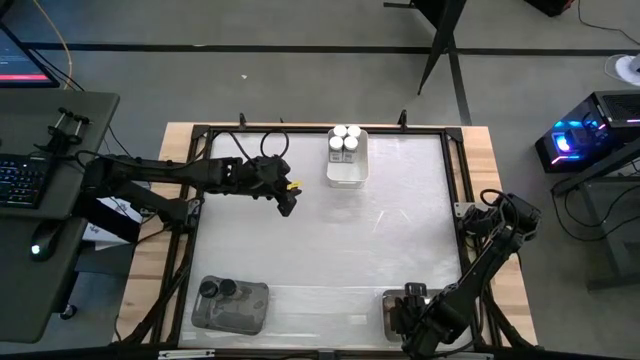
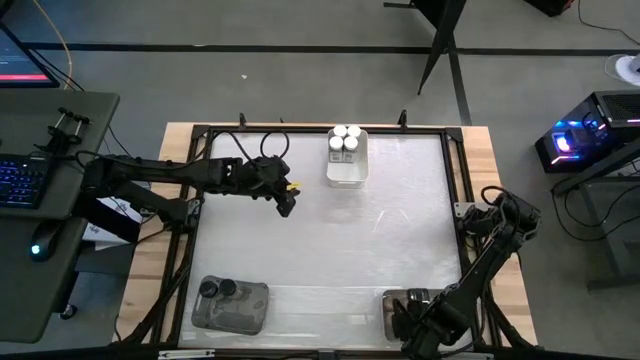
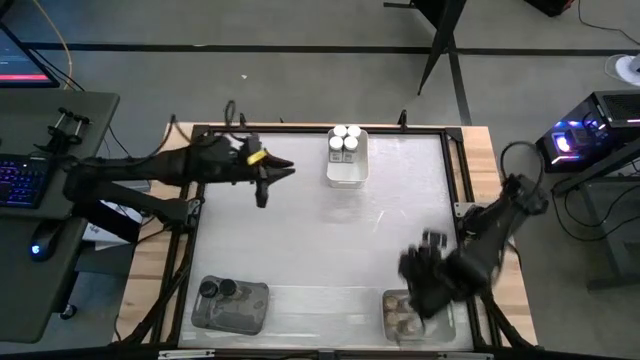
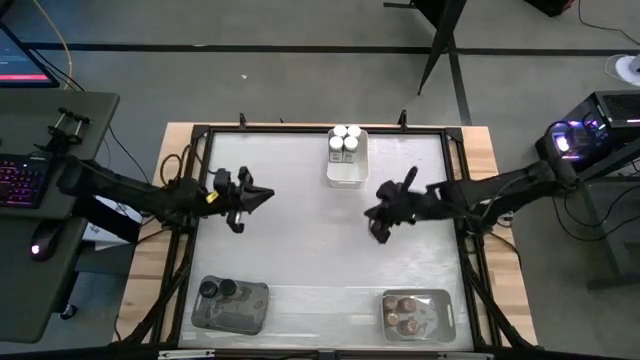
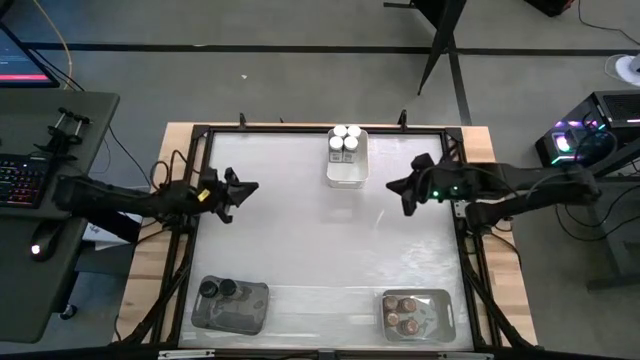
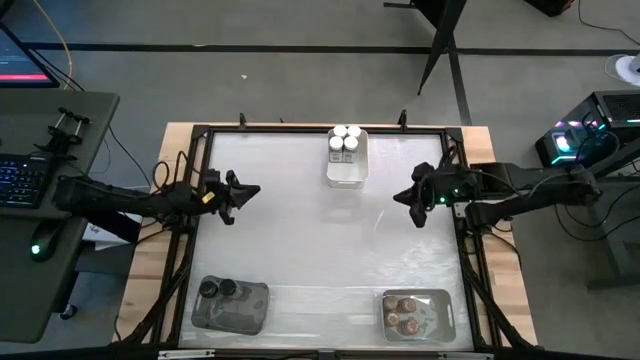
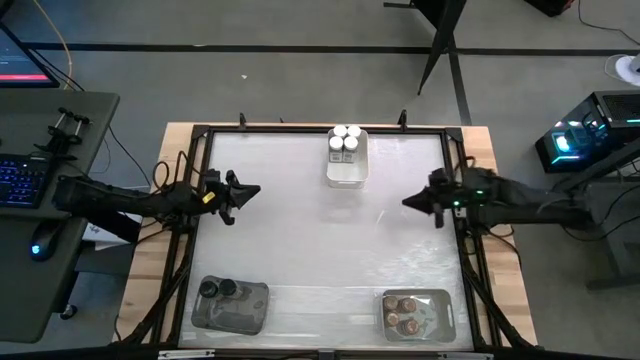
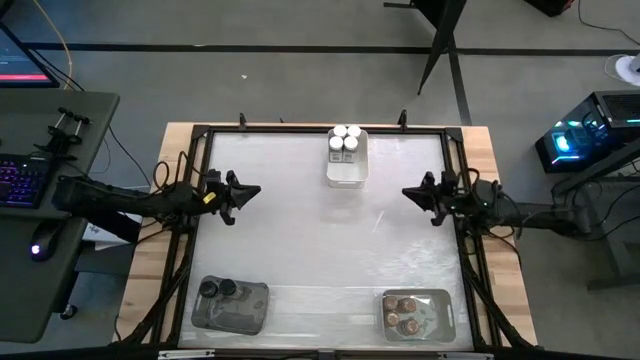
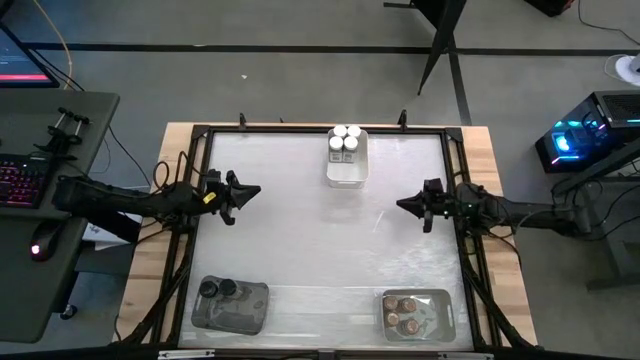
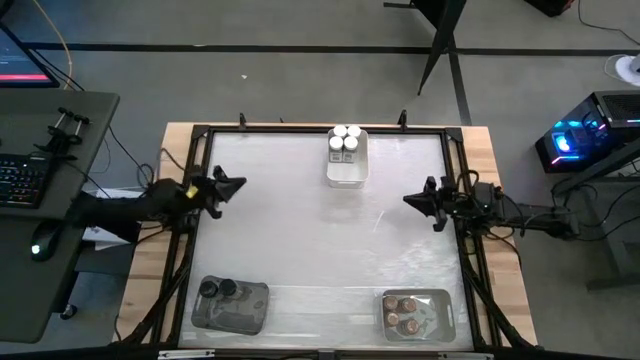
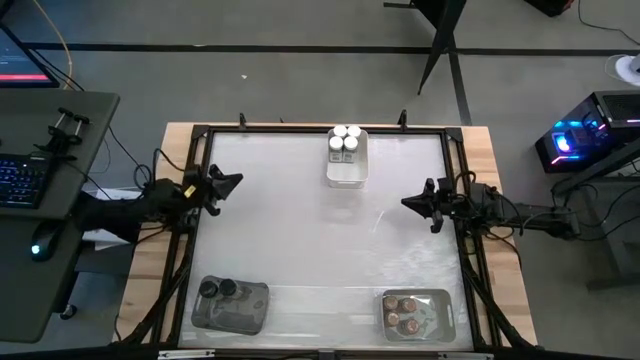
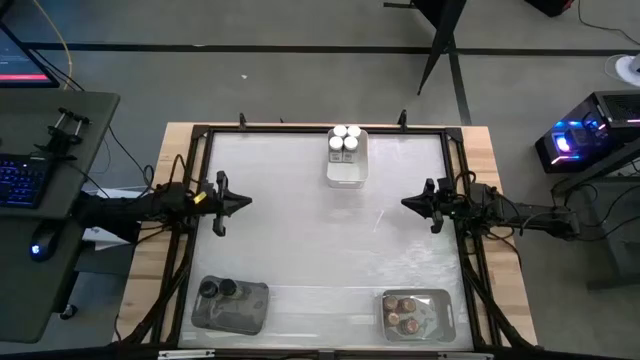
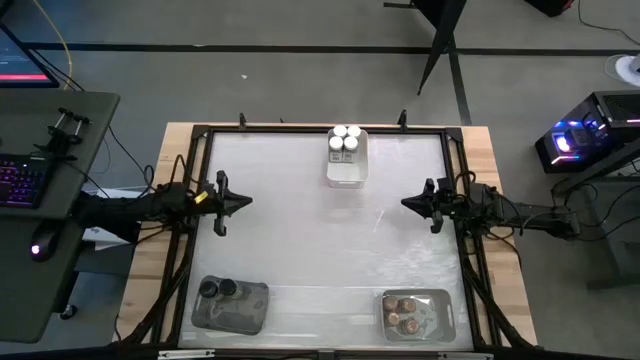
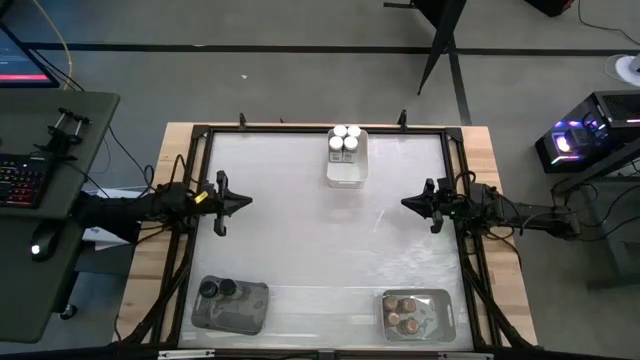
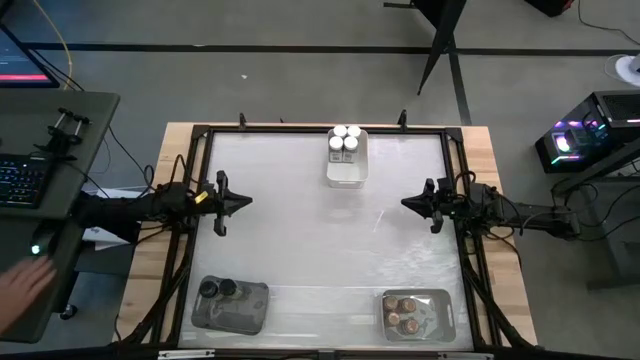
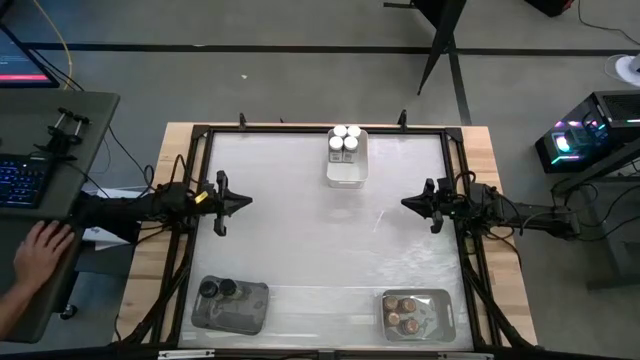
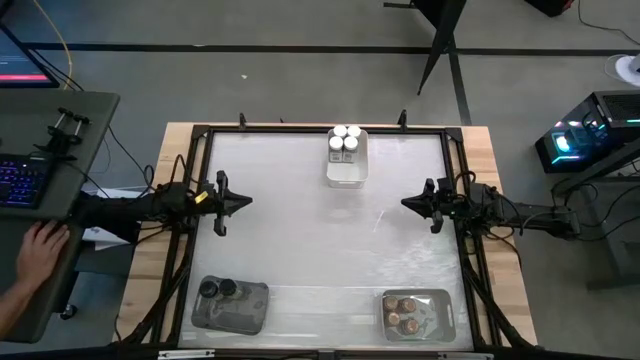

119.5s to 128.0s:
Task: Sort spices by type
Return to Home Position

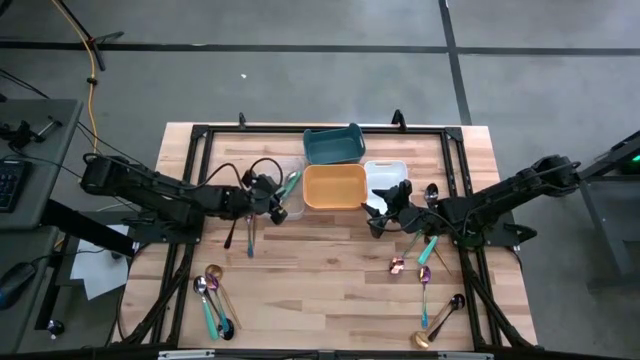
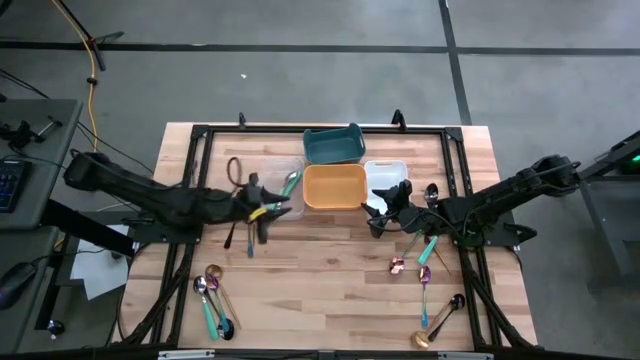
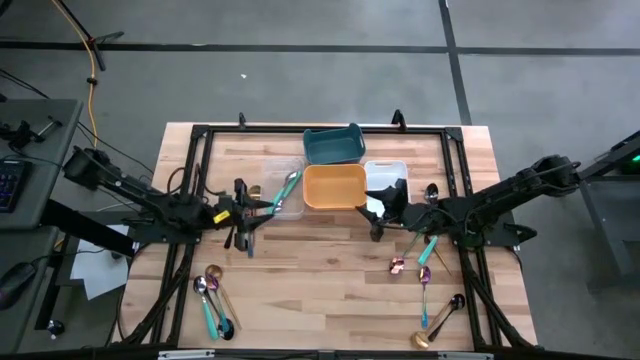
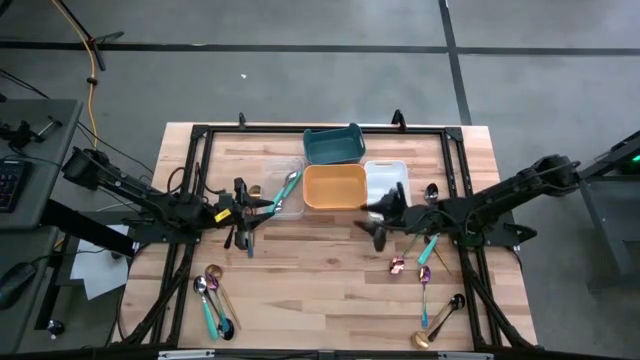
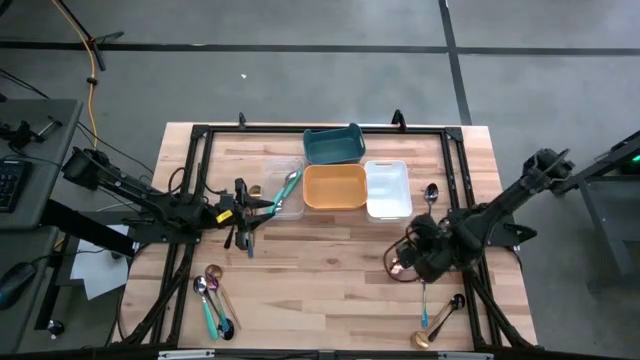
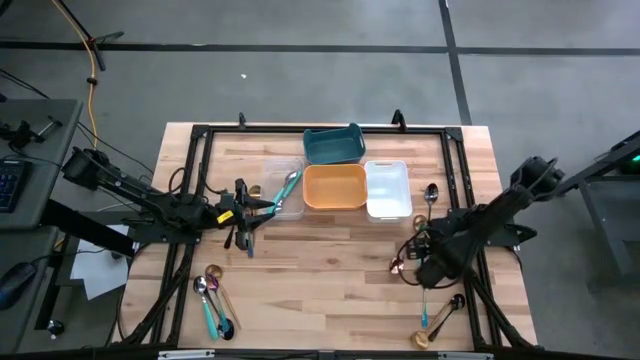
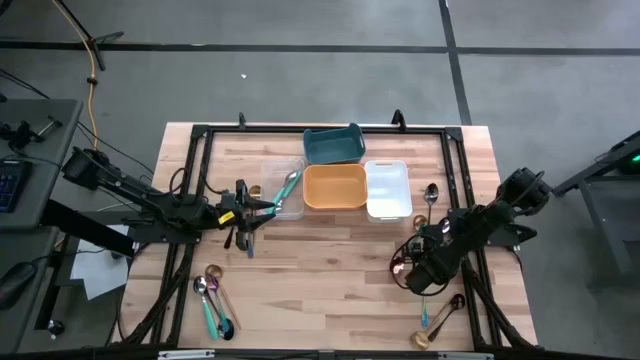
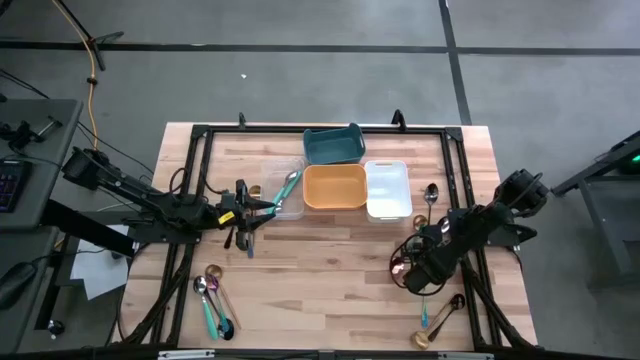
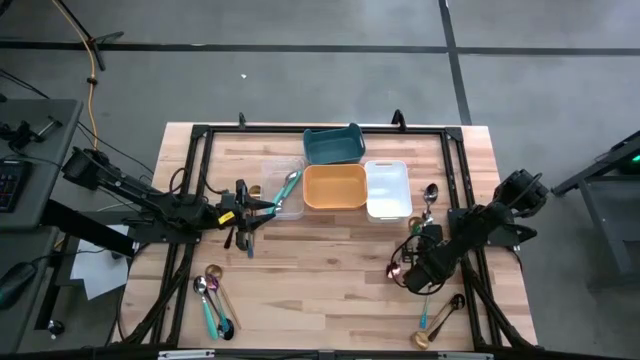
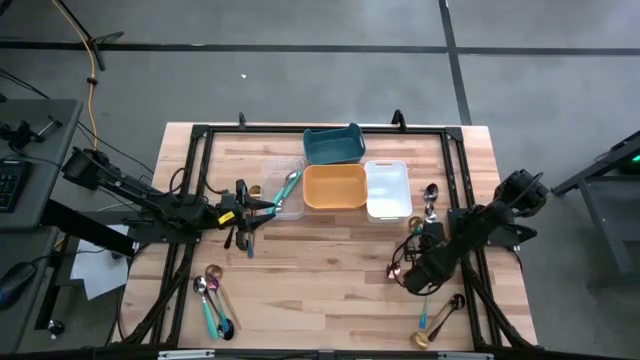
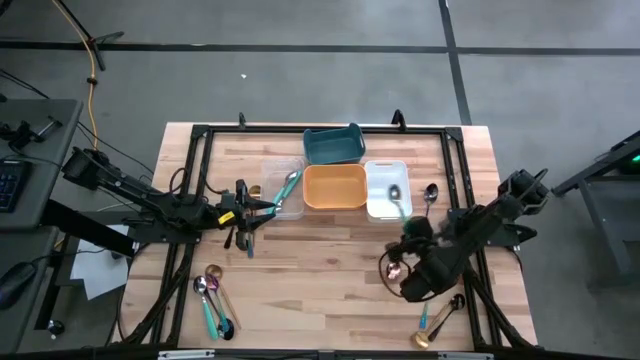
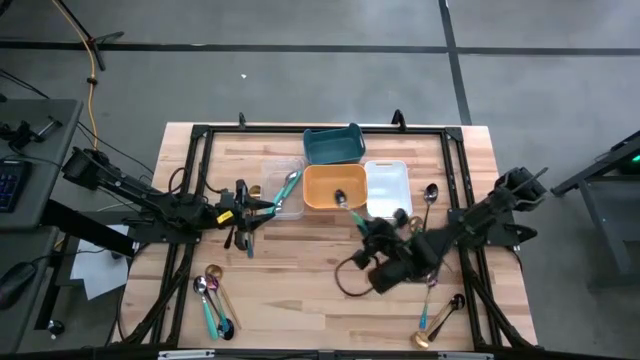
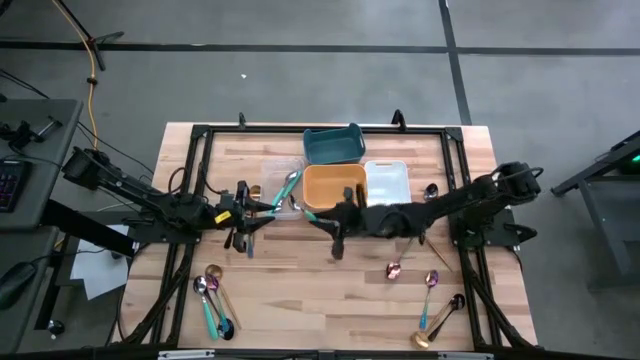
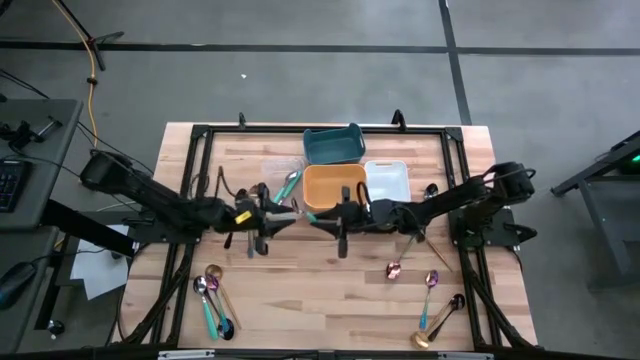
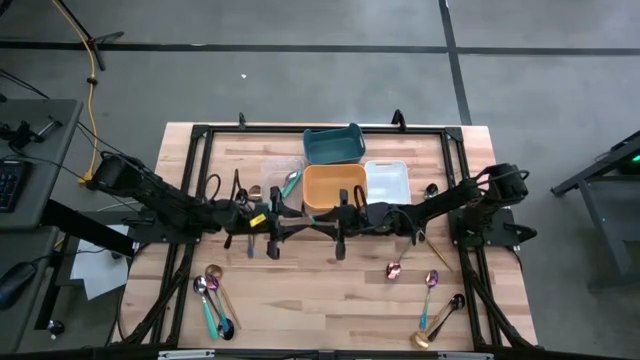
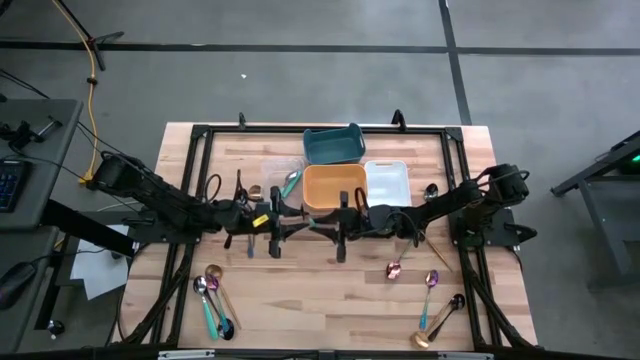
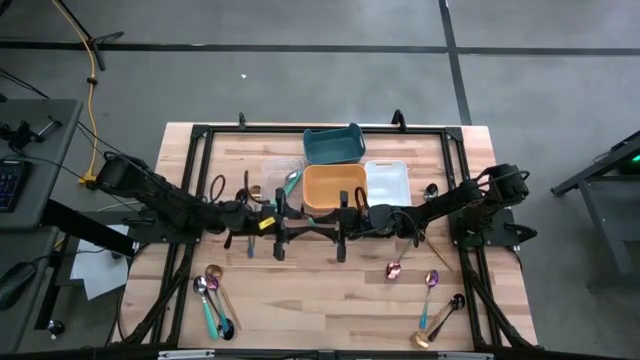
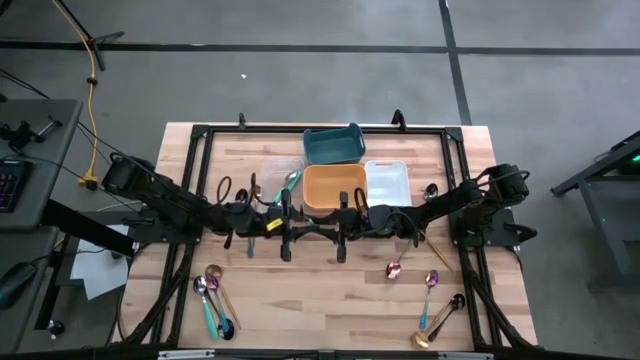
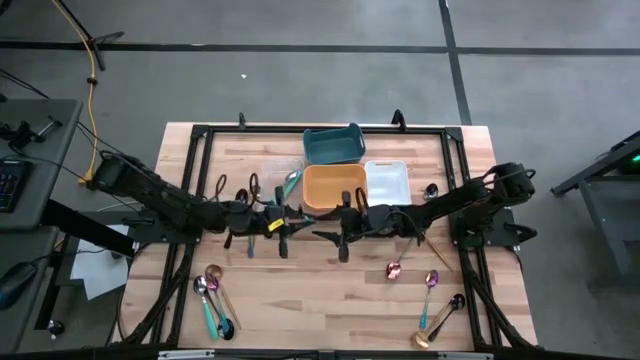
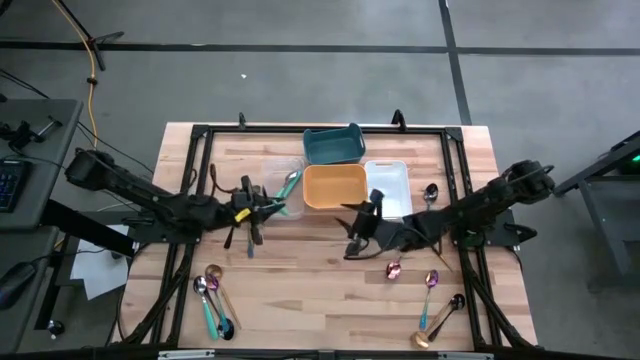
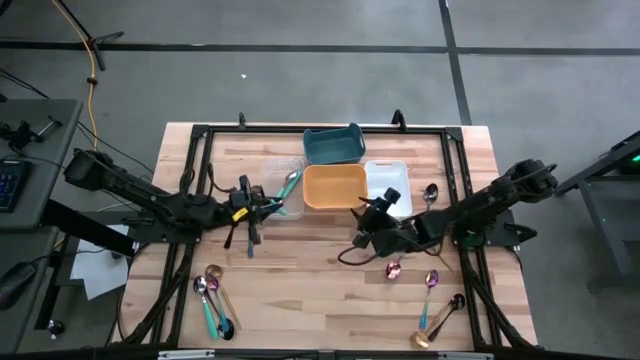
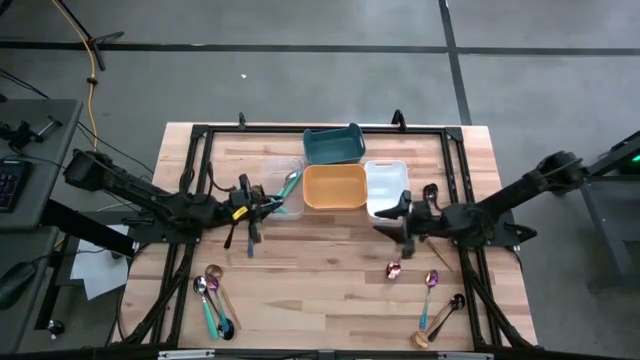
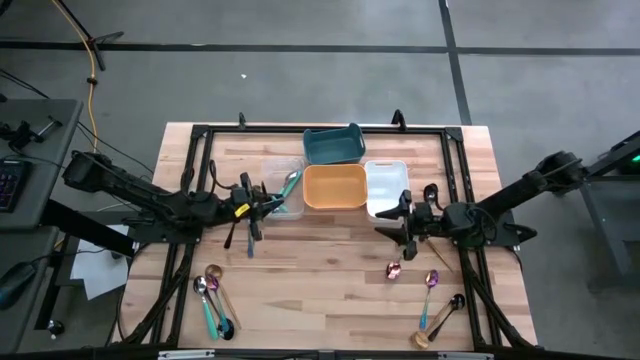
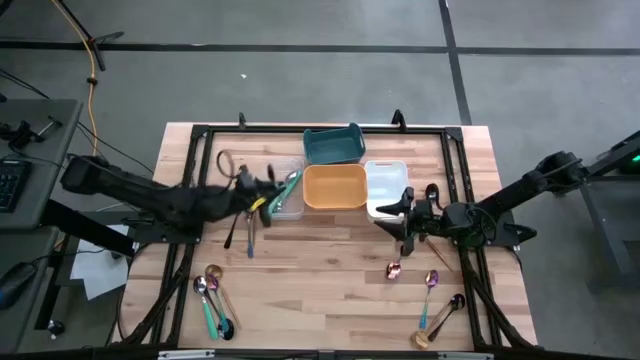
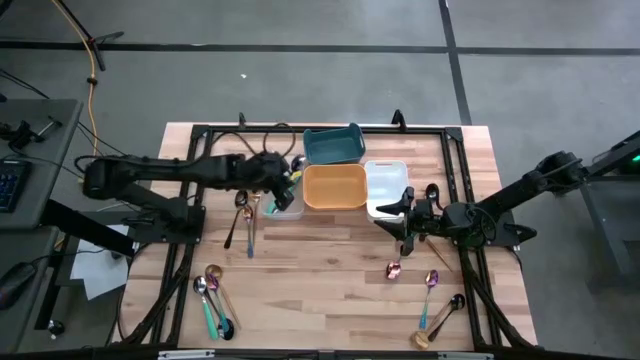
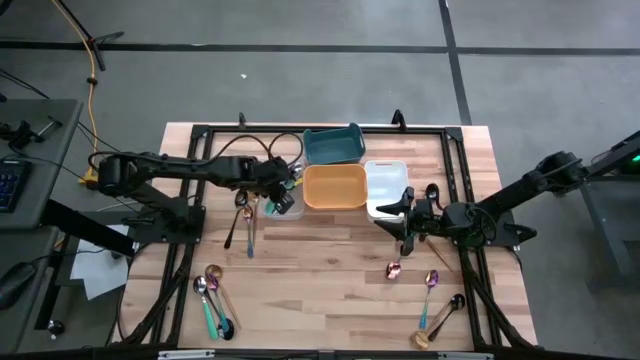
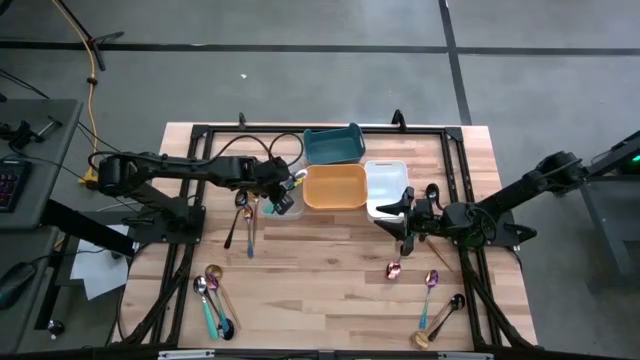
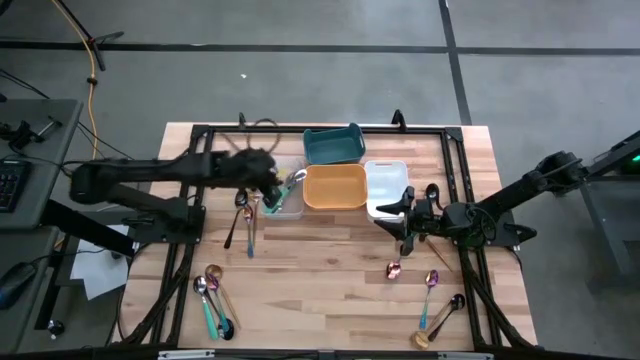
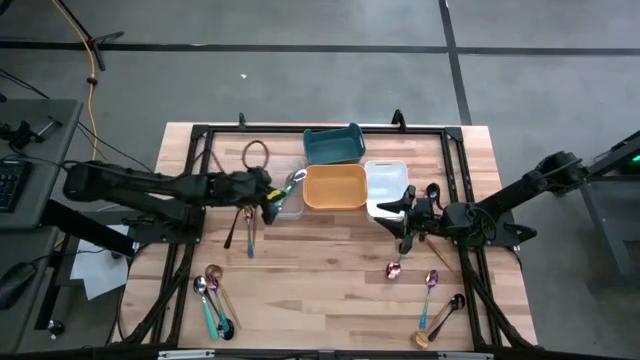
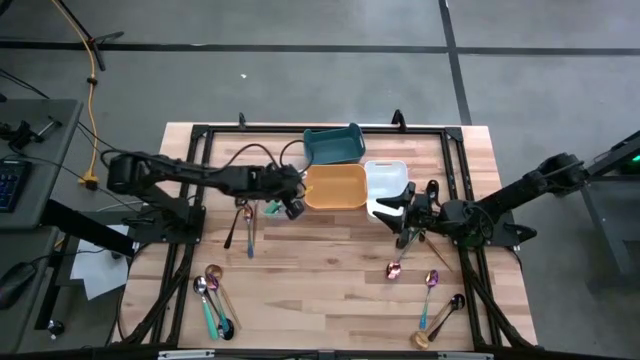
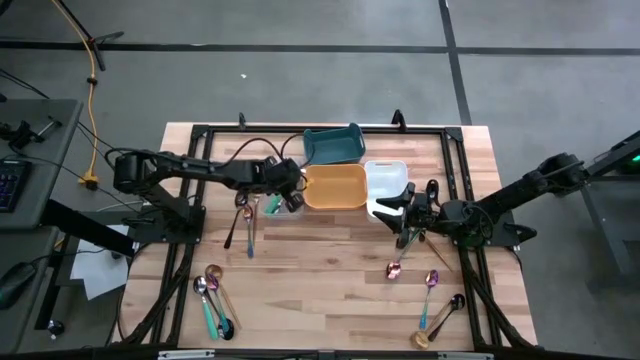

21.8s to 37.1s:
Task: Sort silverware by color (type)
Put the turquoise blue spoon into the transparent bin
